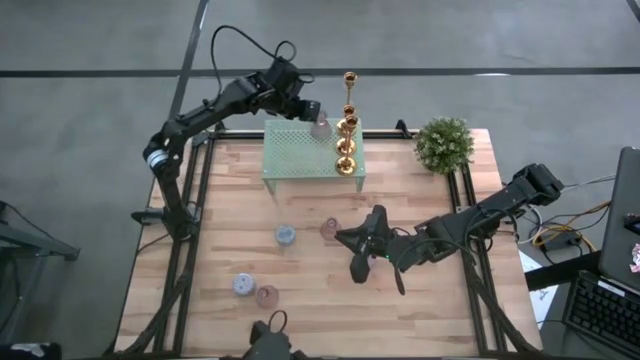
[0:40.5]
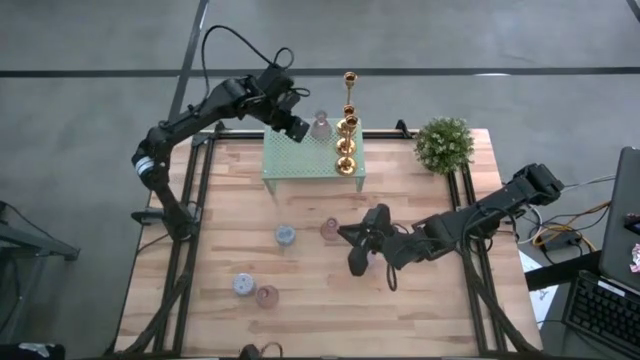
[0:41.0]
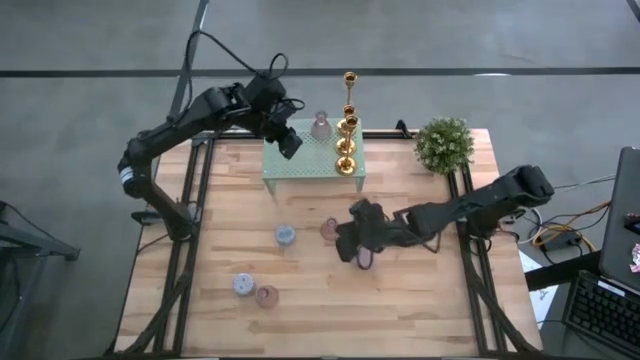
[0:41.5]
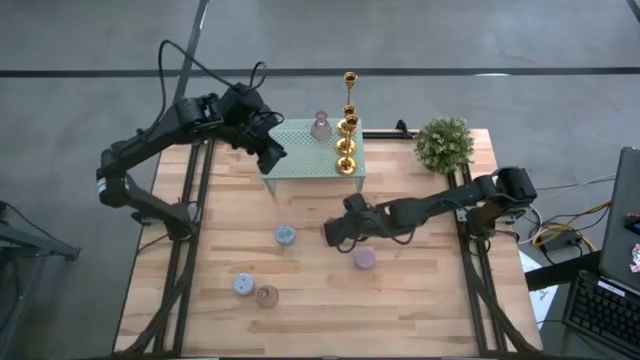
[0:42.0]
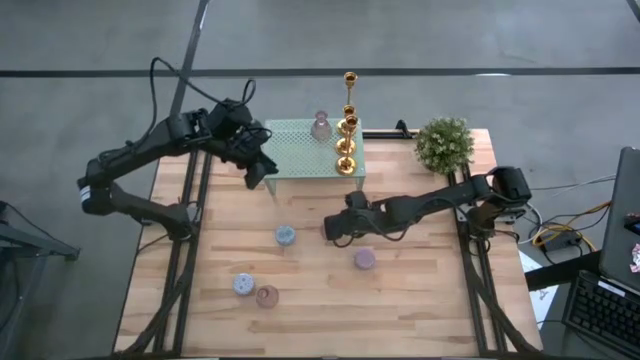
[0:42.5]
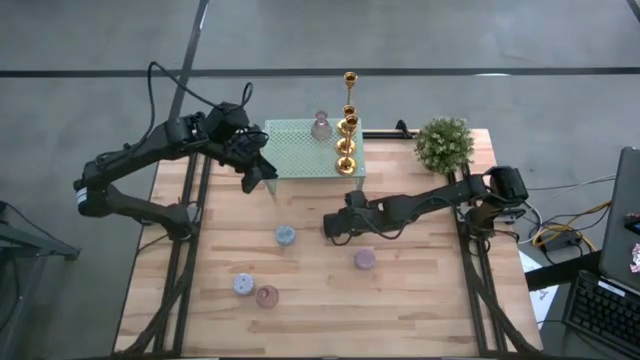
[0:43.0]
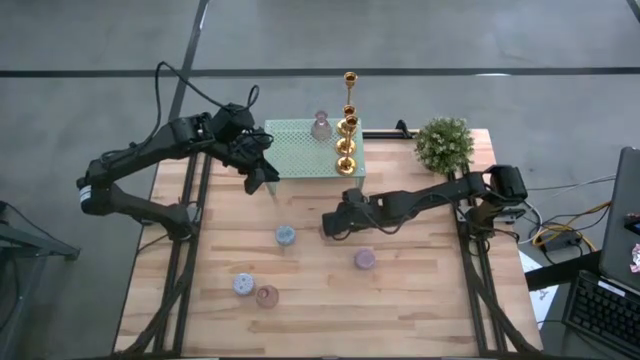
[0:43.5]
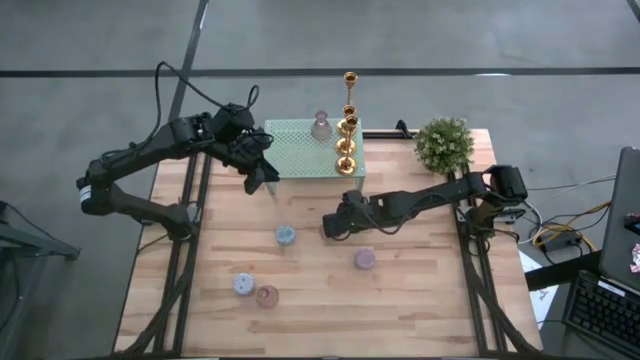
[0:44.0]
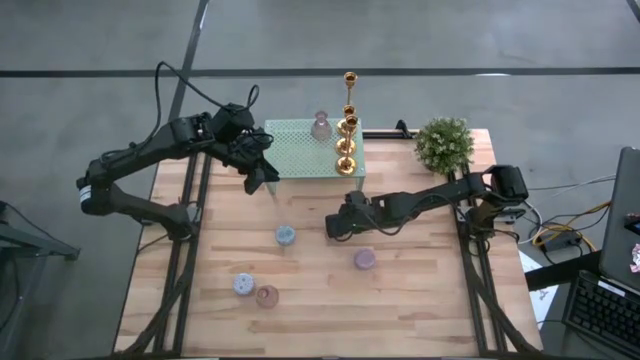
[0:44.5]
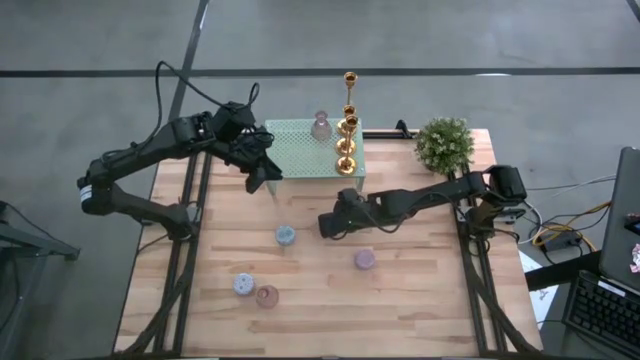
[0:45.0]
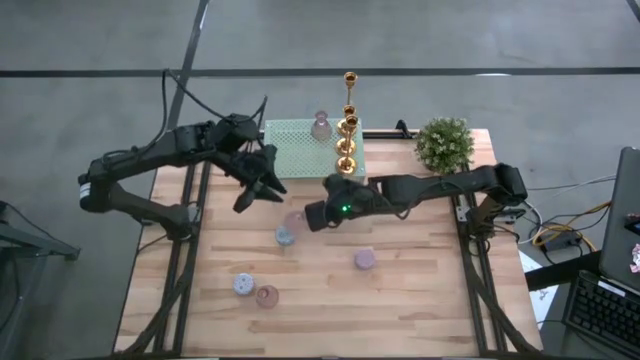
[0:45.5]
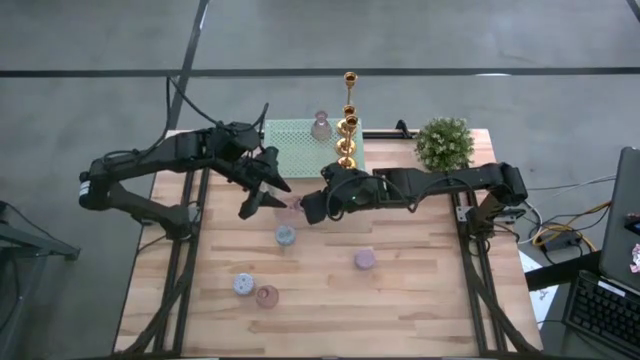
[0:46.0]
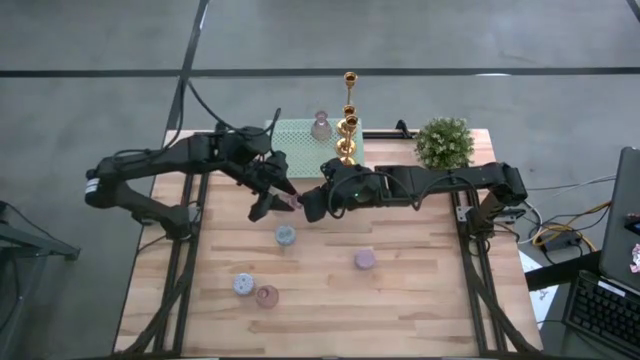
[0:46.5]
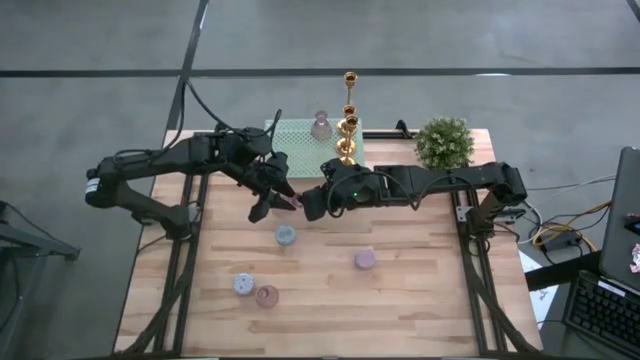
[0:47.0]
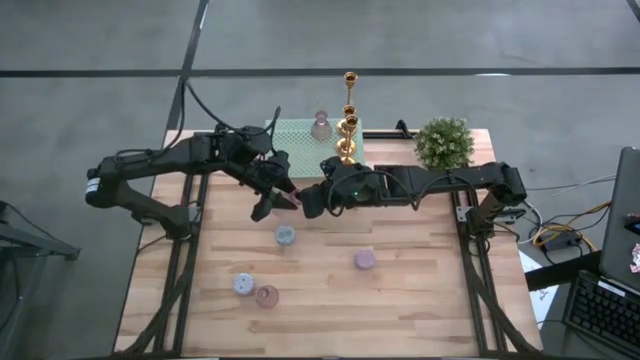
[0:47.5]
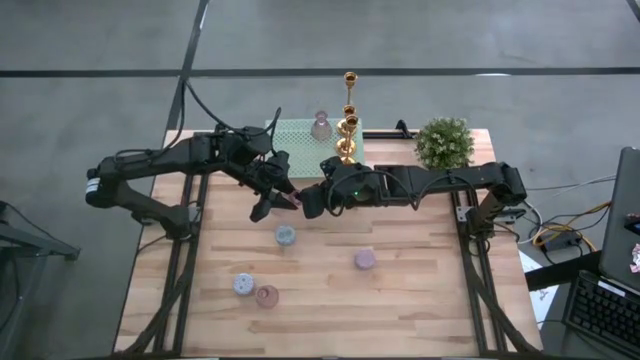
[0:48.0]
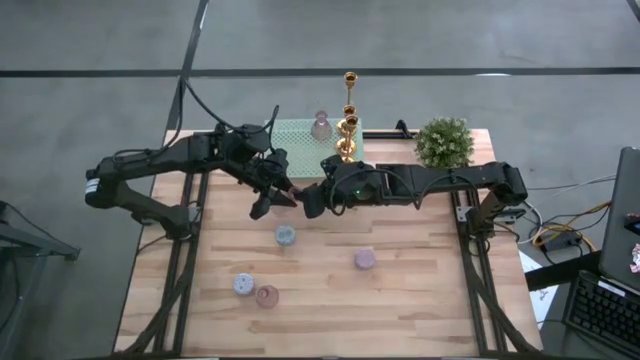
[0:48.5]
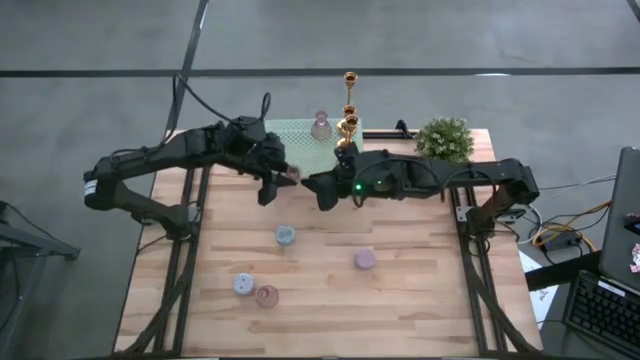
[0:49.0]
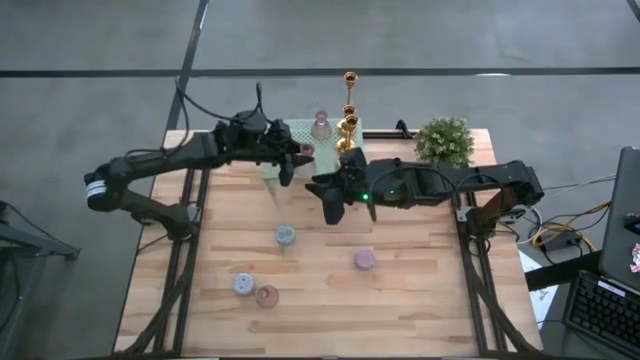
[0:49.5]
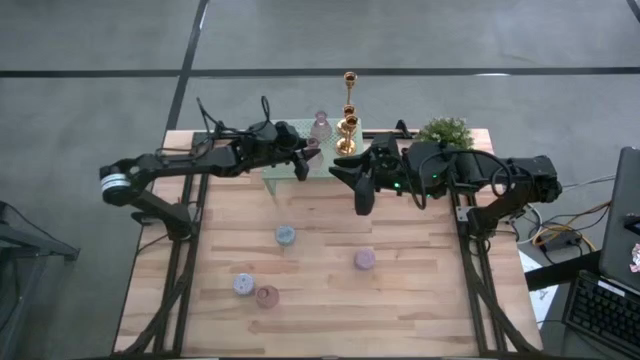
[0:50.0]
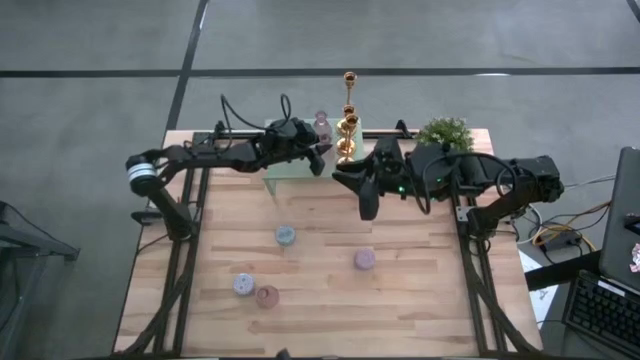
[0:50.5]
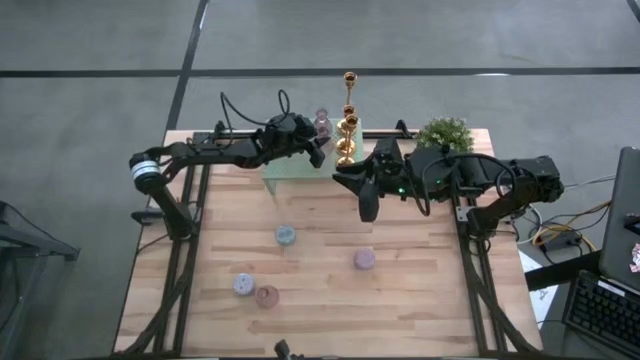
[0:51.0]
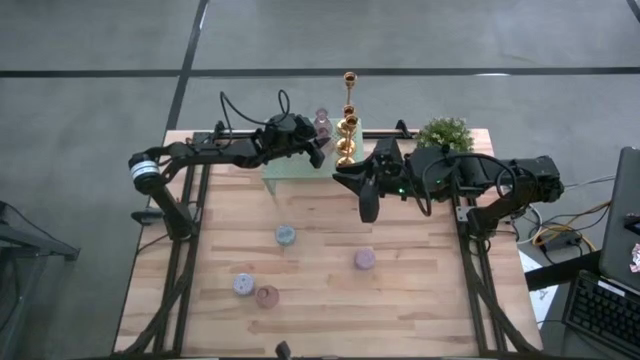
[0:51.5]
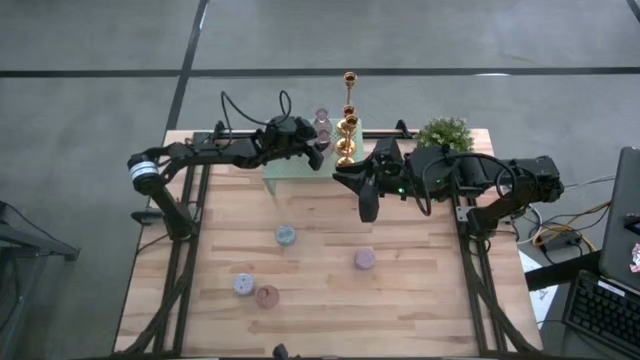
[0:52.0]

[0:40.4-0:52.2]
Task: Pick & Place candle stick holders
Put the top pink glass candle holder aligned with the other pink glass candle holder on the shelf

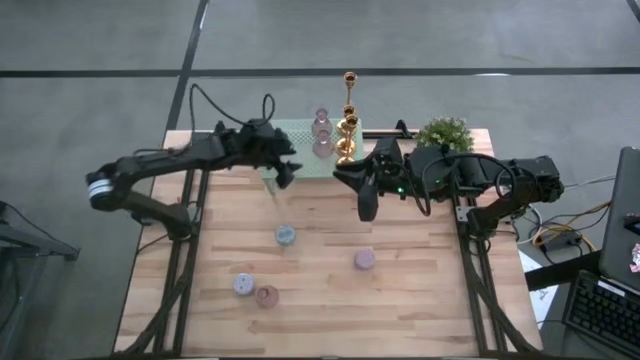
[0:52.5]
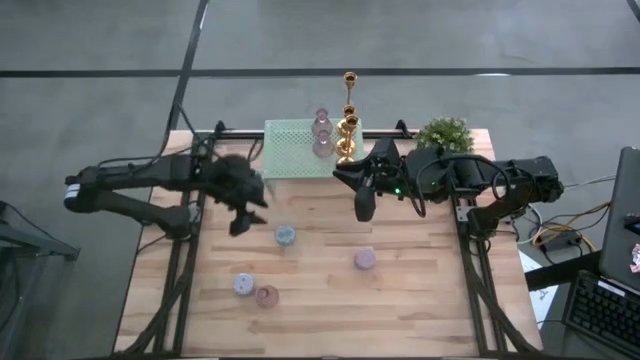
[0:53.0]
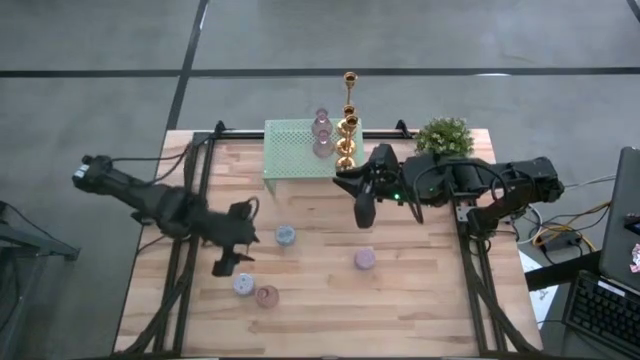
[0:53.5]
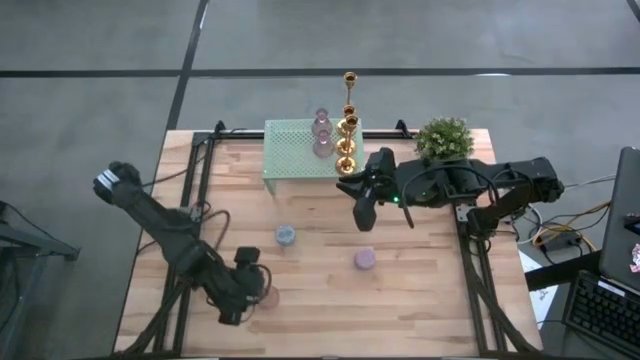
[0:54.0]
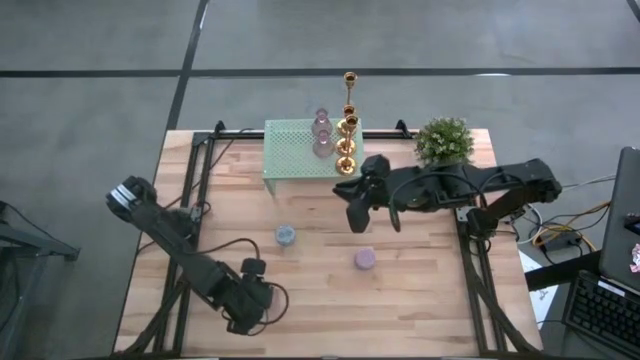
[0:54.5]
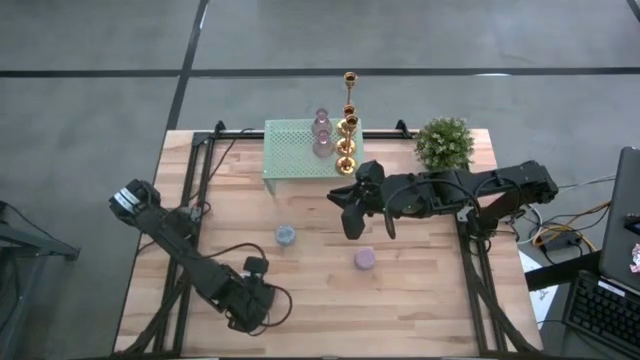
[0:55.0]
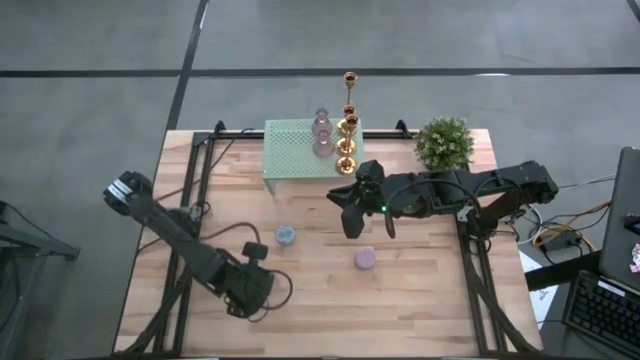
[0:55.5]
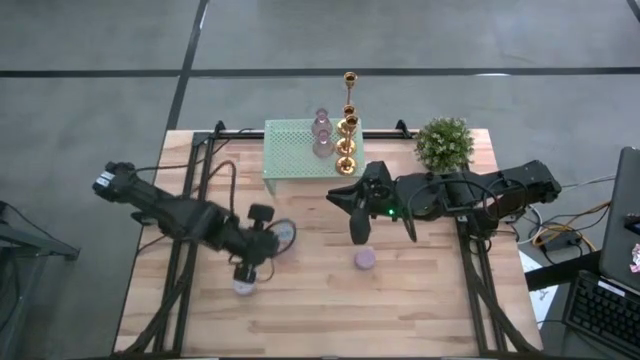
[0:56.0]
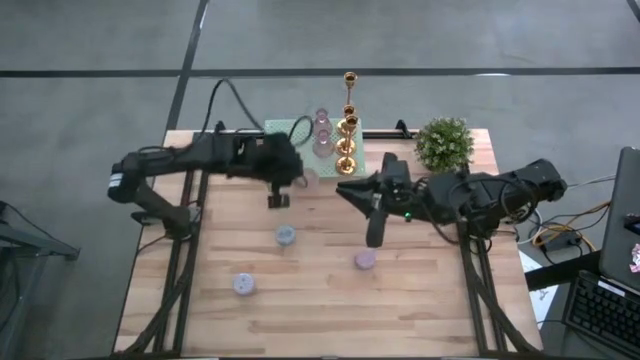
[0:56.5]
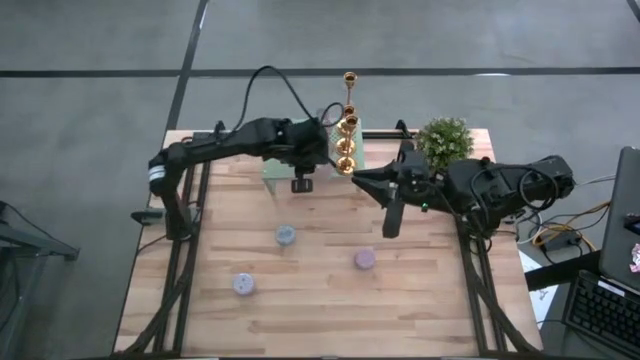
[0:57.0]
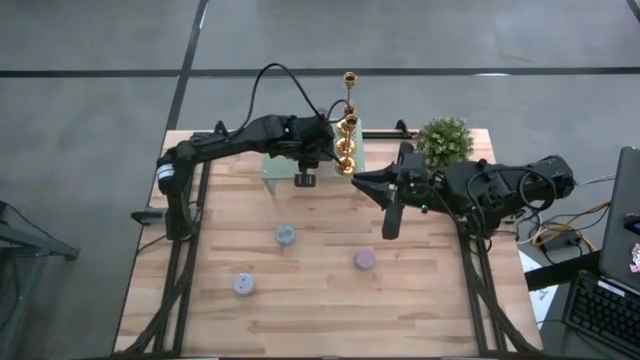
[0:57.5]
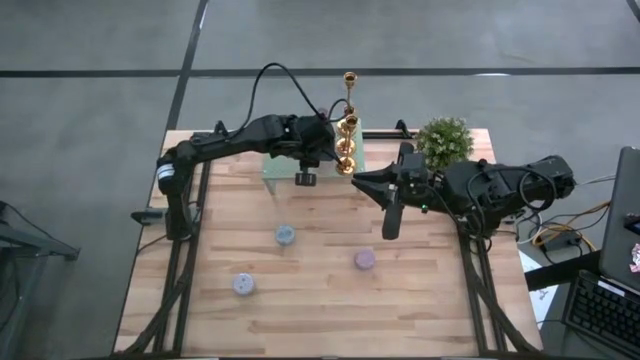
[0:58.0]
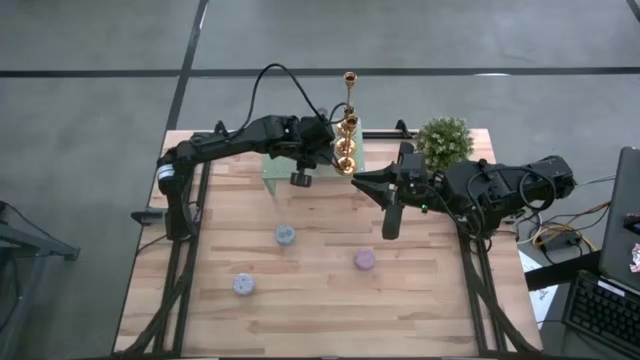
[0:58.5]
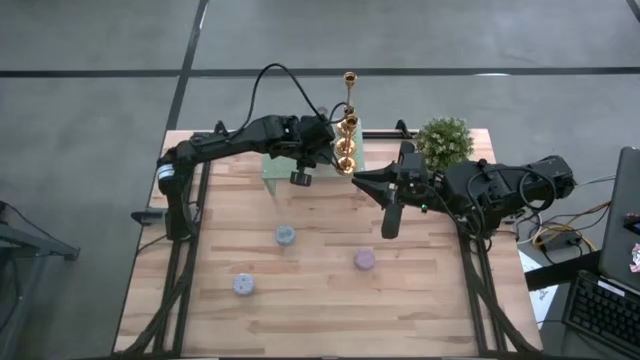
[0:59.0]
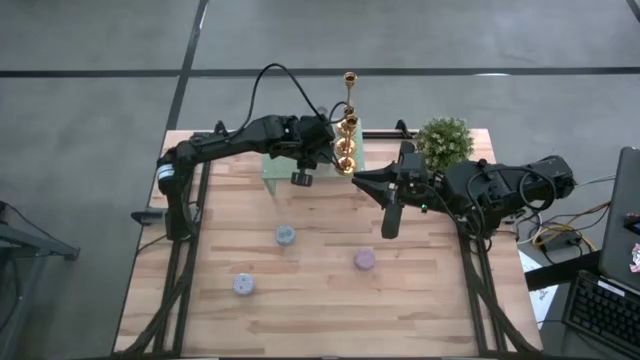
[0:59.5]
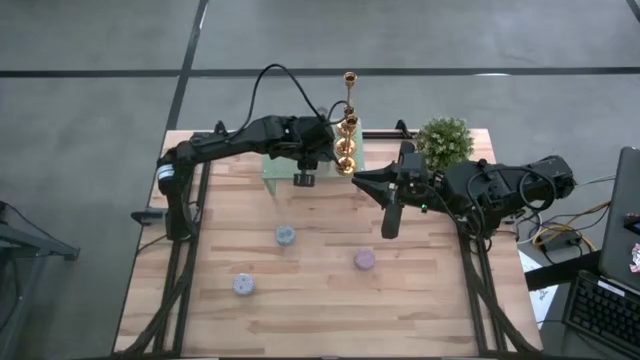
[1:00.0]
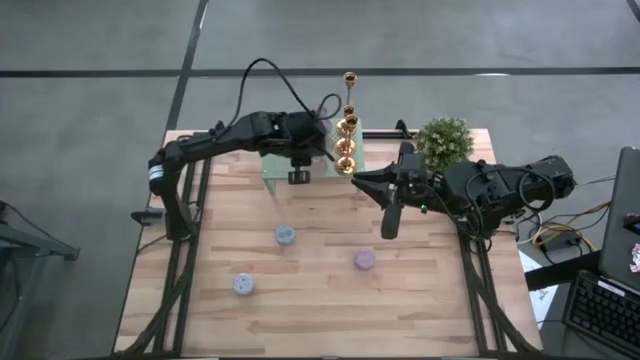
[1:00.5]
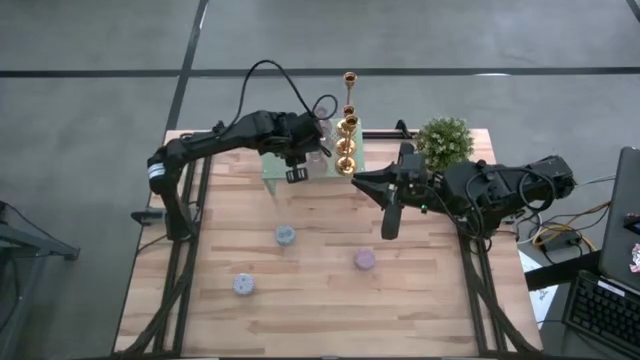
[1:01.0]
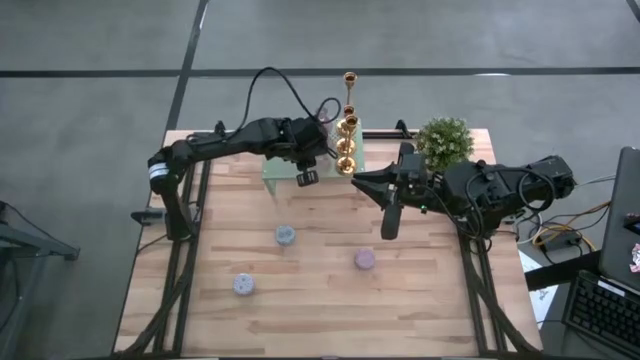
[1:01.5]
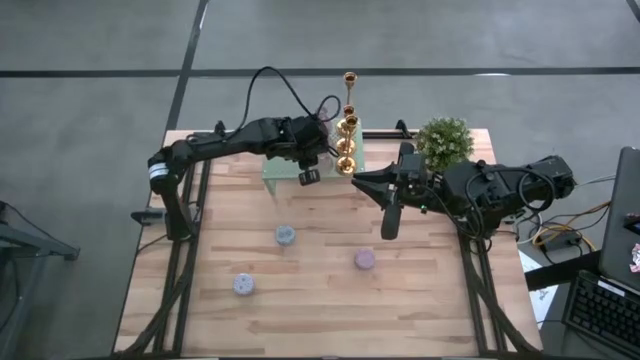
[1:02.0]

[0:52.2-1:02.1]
Put the pink glass candle holder aligned with the other pink glass candle holders on the shelf
